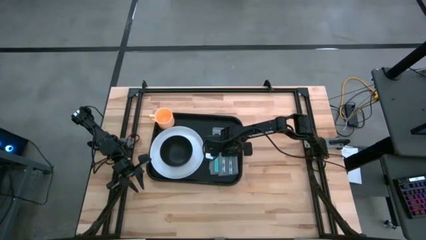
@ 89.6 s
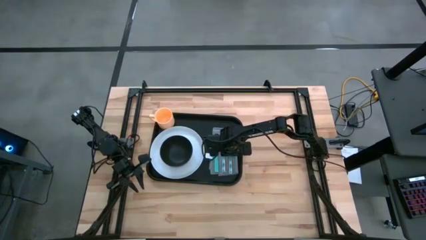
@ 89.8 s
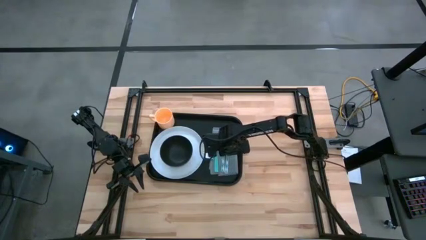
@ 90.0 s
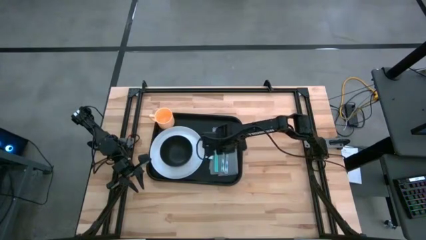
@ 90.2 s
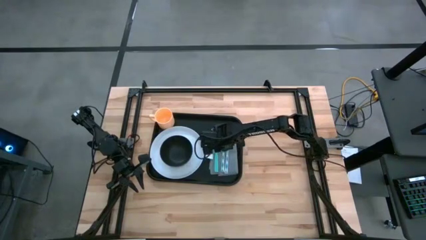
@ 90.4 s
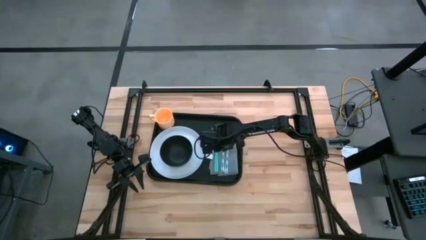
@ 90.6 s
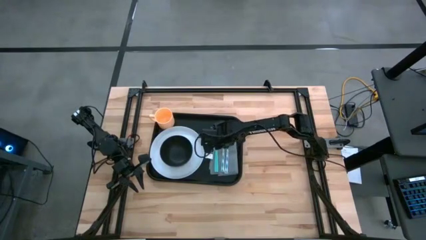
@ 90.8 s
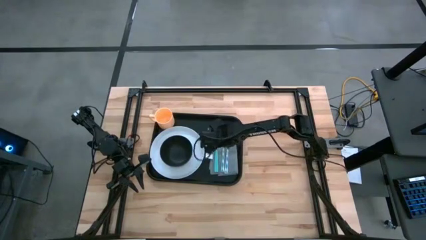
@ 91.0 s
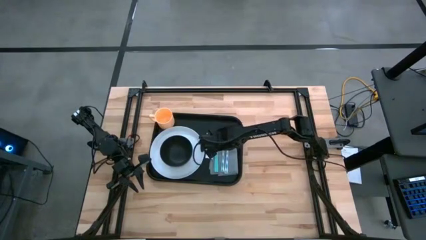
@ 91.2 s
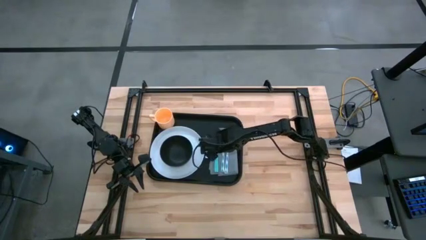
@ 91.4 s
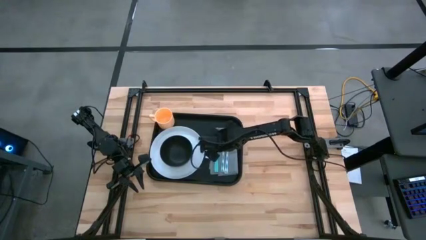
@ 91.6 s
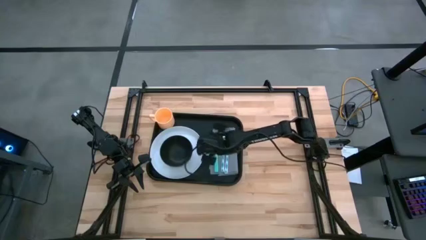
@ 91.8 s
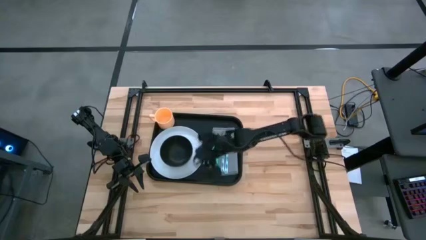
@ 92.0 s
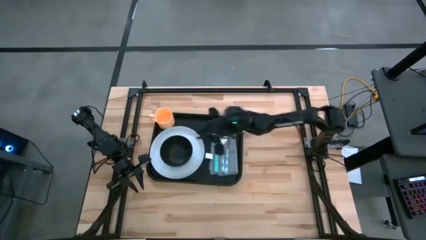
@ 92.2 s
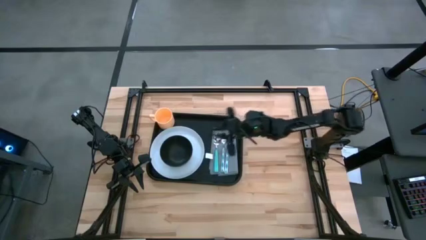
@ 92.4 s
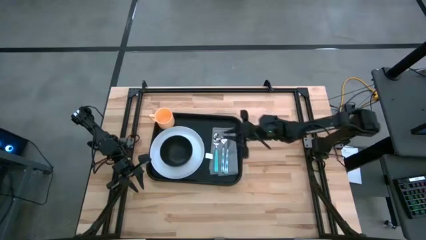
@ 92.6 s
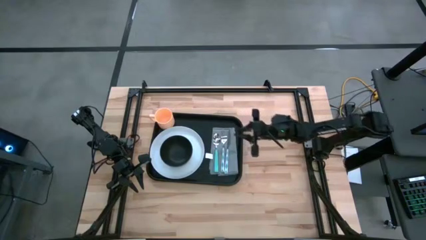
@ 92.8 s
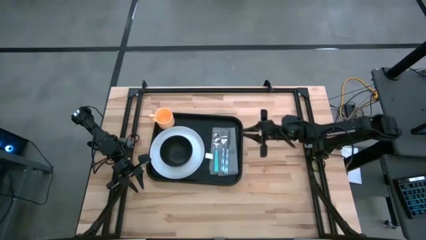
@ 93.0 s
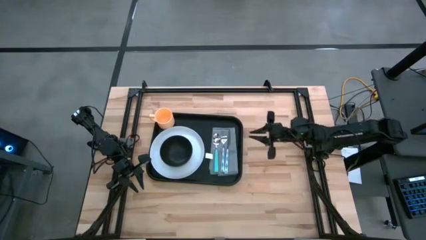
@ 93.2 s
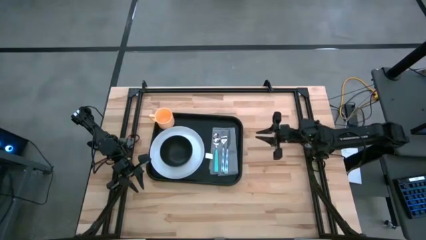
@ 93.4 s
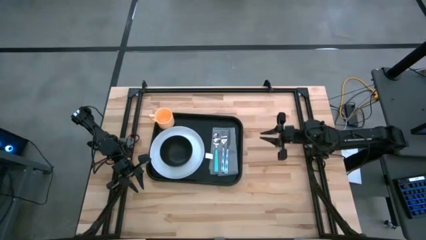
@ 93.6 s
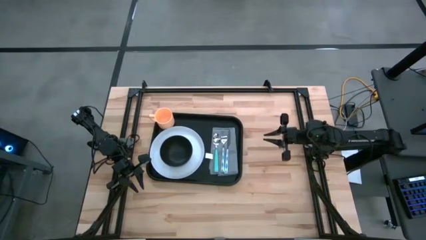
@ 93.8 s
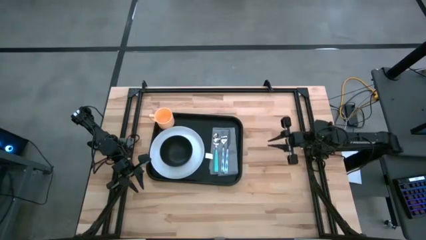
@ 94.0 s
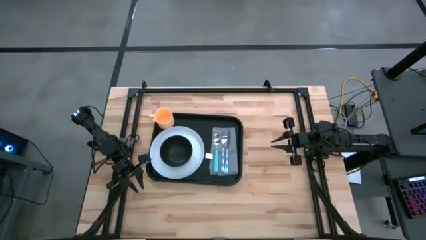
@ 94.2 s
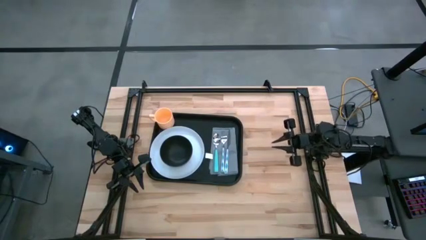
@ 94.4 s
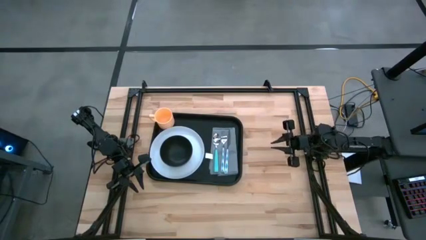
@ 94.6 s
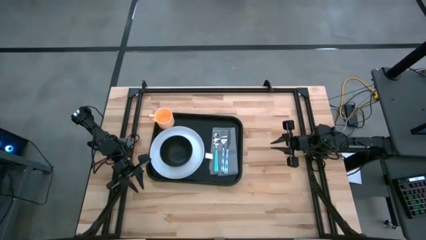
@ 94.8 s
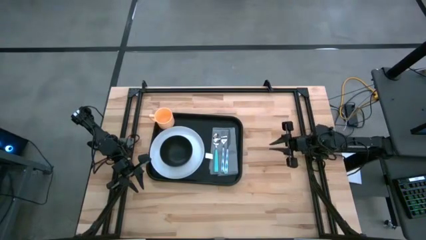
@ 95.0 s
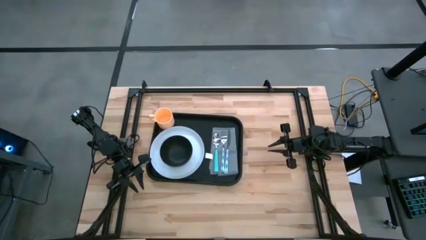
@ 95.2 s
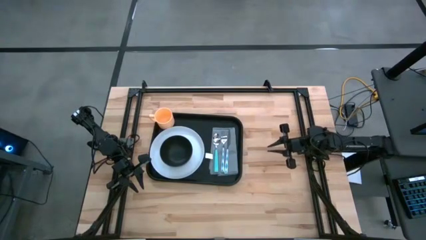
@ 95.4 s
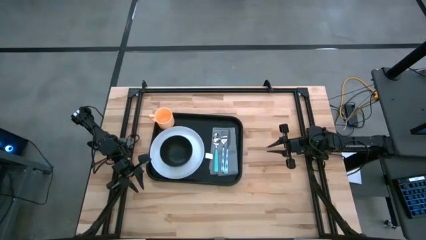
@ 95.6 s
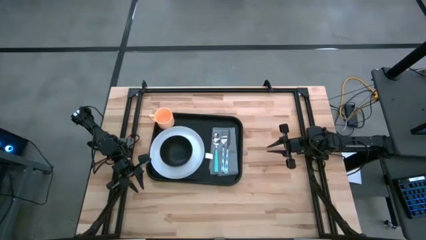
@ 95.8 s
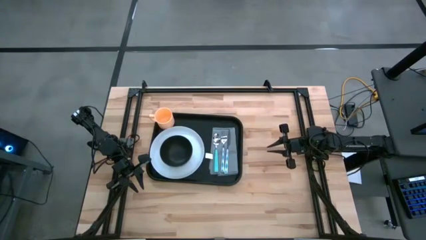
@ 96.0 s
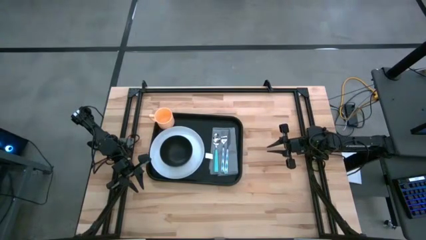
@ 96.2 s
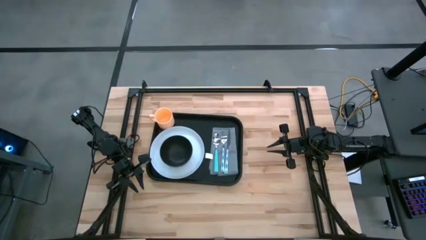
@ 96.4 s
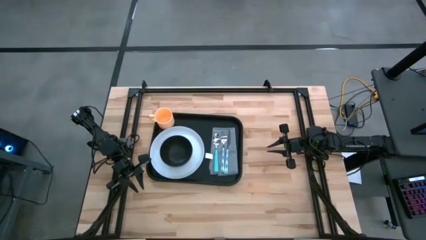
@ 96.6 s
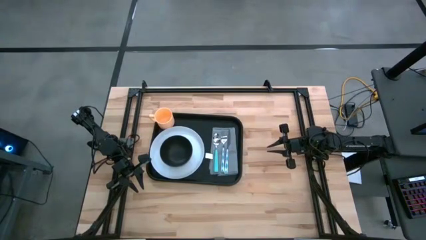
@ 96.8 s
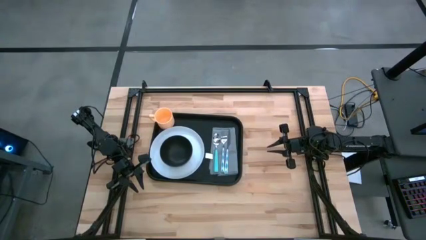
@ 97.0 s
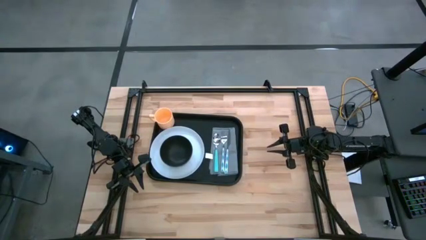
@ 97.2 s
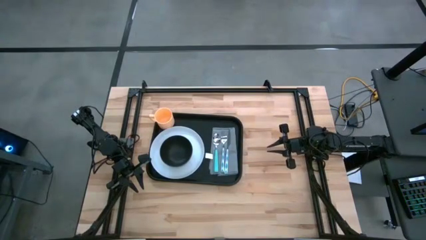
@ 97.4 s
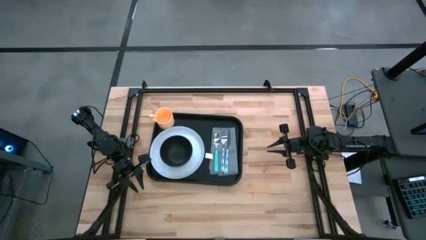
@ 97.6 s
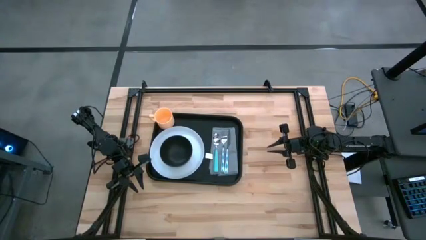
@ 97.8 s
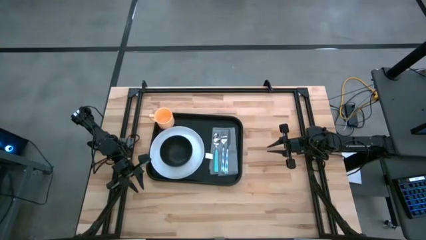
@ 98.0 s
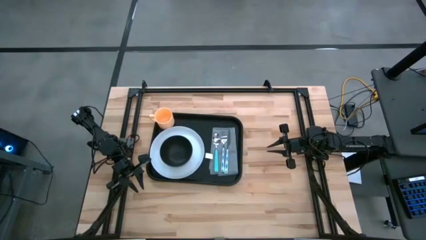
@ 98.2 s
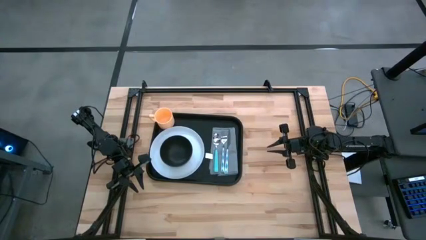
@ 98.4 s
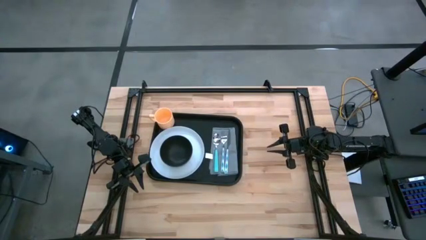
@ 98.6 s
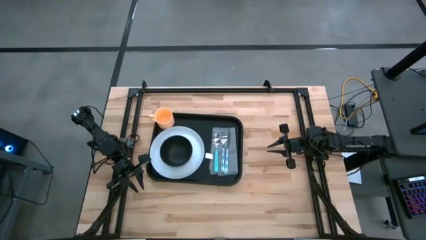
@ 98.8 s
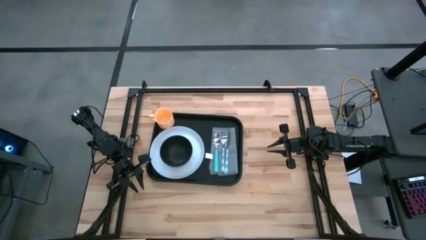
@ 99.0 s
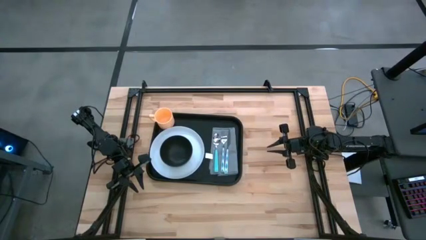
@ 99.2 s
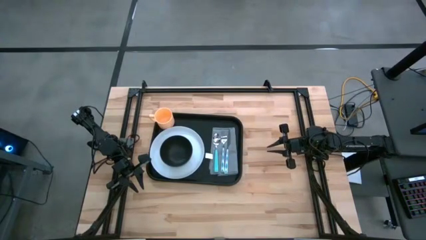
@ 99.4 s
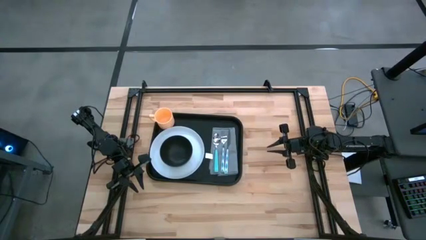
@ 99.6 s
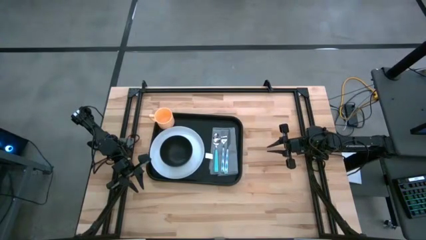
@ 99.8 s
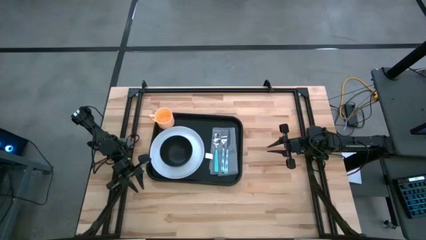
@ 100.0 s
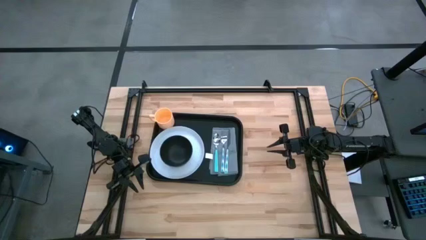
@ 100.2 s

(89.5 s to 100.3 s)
Task: Set up tray
Return to Home Position

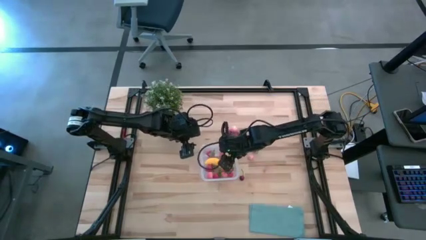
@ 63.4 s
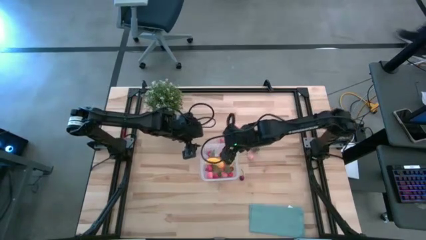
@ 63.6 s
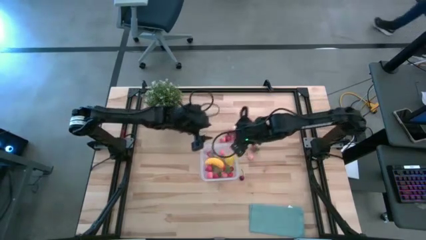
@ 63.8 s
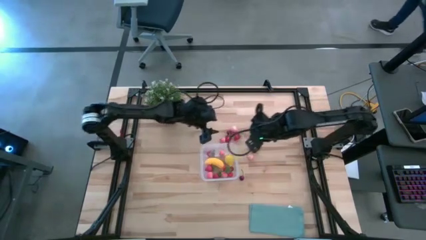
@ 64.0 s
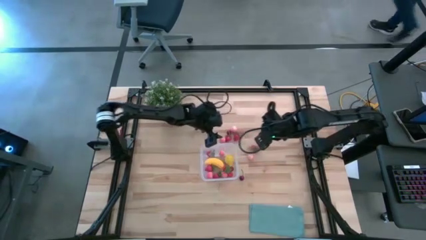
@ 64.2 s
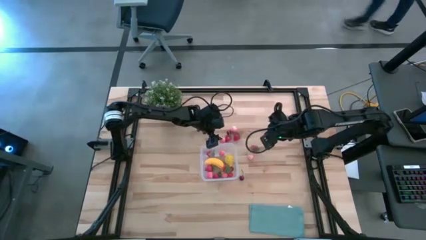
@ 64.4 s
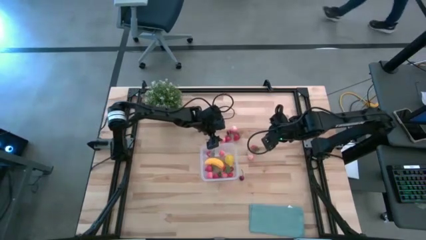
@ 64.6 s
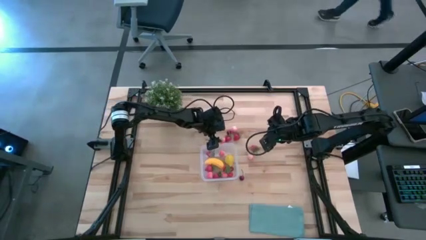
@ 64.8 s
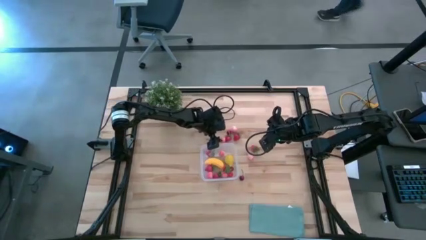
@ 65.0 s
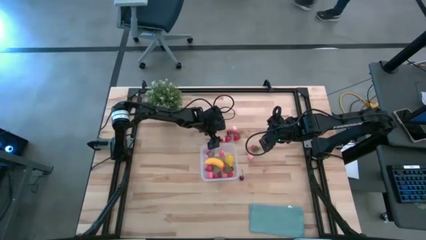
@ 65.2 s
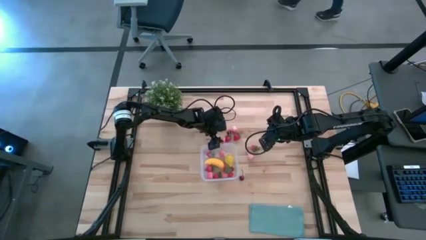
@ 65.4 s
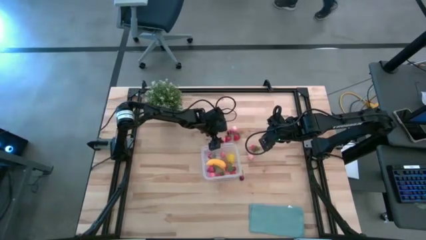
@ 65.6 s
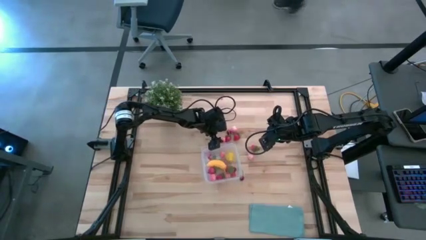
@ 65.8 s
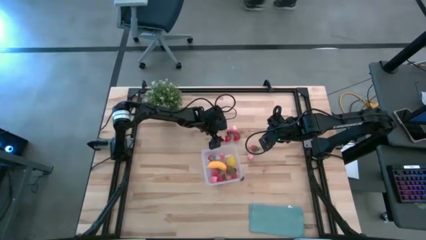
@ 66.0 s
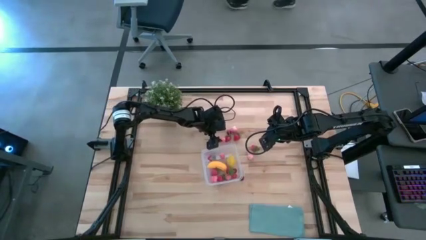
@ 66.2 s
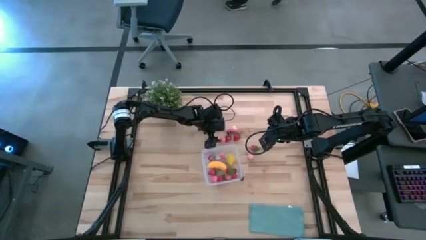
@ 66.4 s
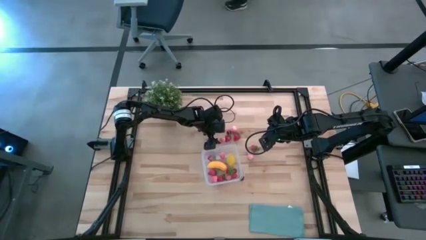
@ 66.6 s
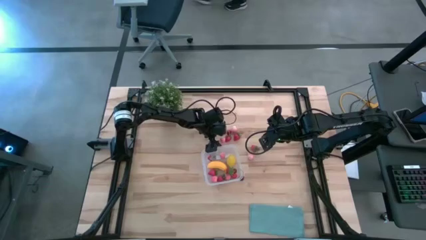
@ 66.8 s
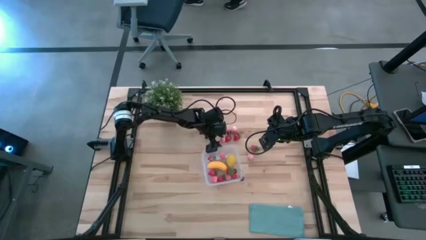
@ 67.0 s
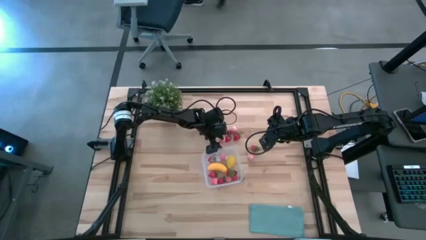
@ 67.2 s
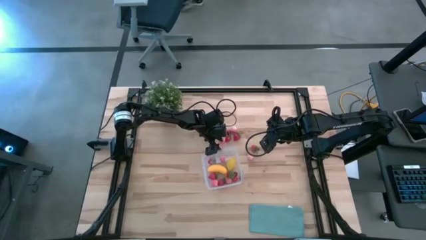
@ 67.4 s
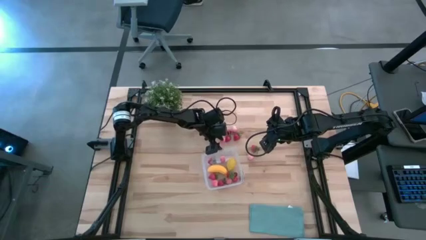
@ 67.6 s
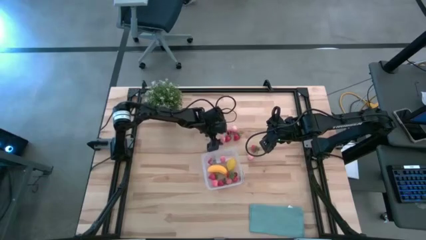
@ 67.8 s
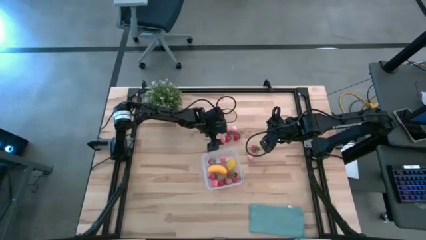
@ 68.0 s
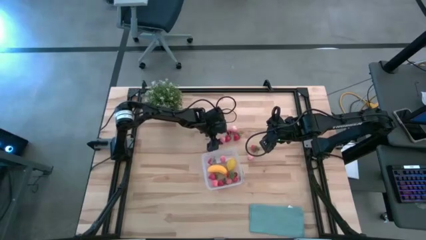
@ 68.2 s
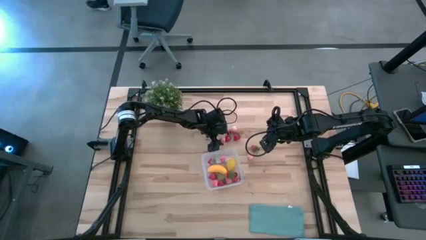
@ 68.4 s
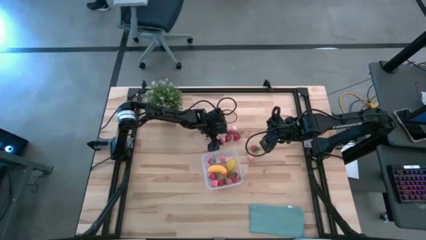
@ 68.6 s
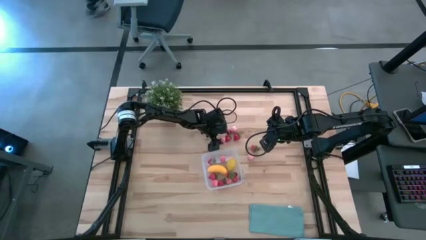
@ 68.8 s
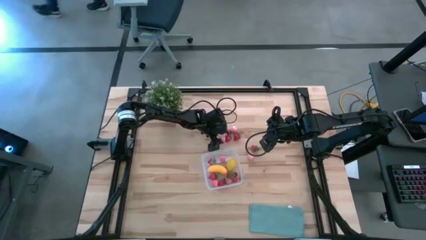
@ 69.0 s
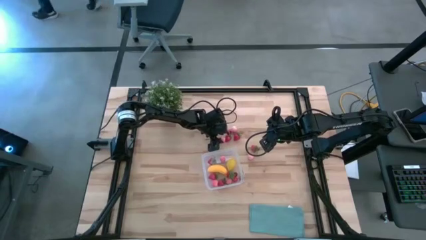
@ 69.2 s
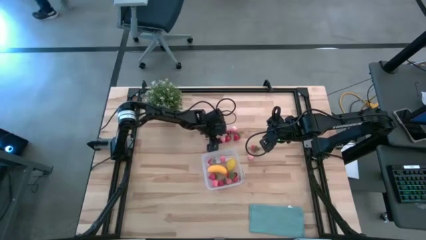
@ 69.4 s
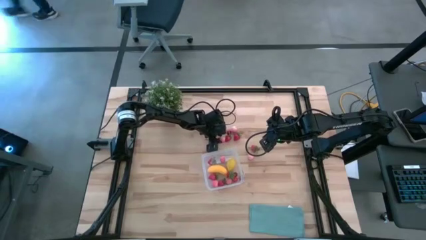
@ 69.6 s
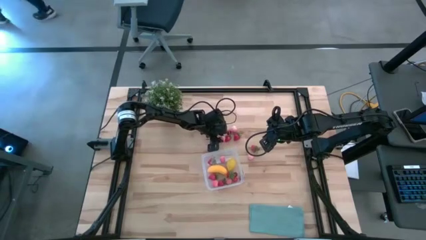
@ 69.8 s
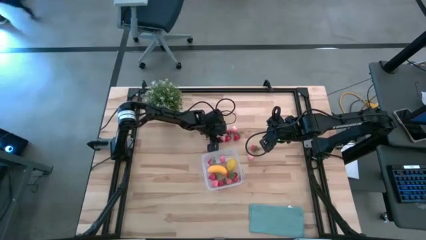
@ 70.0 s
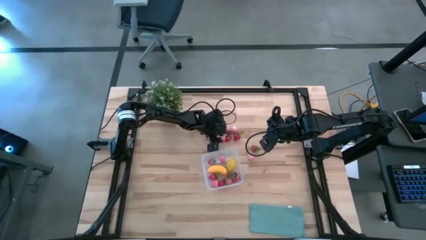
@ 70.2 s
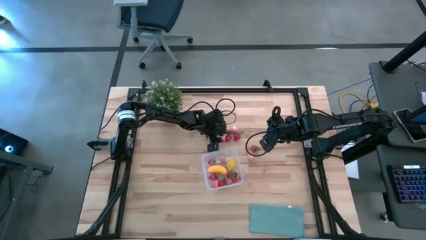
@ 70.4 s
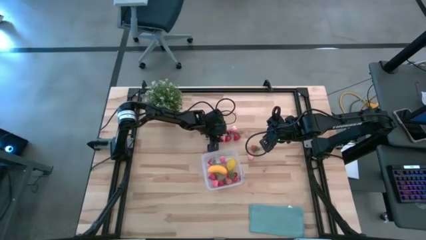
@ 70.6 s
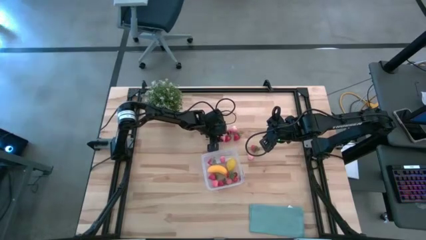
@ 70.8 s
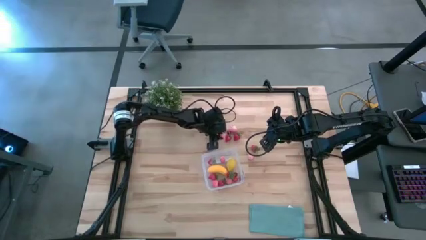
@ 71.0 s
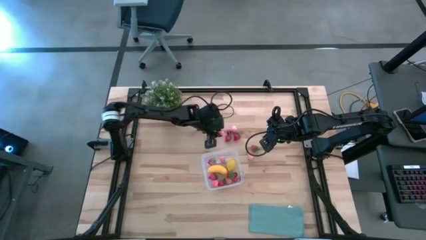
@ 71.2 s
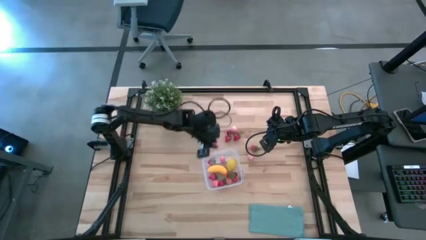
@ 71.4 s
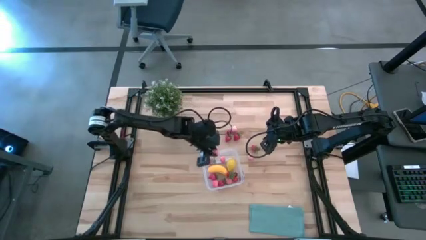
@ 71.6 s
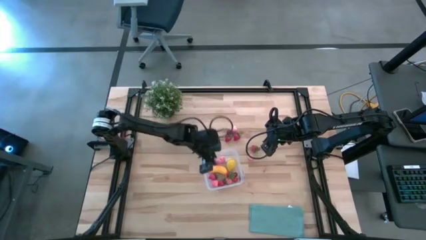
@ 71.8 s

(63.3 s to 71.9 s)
Task: Pick and placing Produce into tupperware
Put the pink peach into the transparent container
